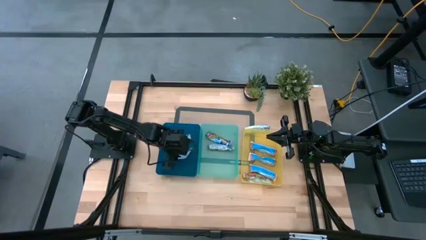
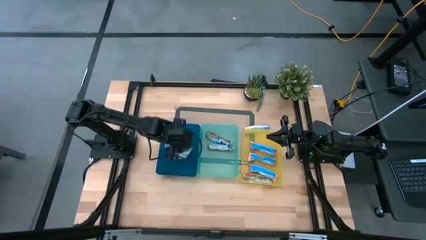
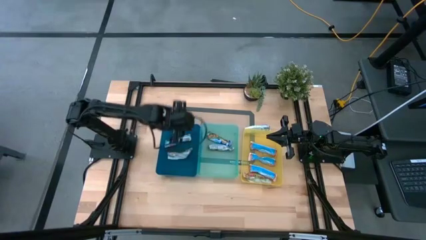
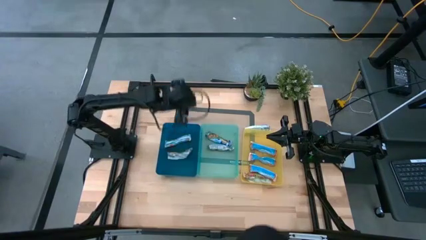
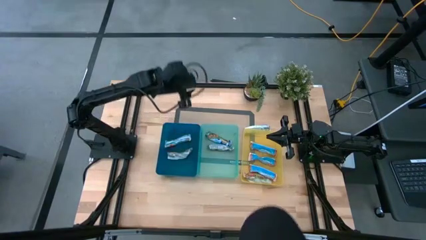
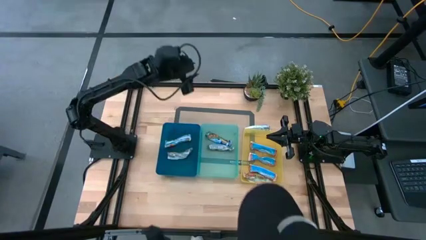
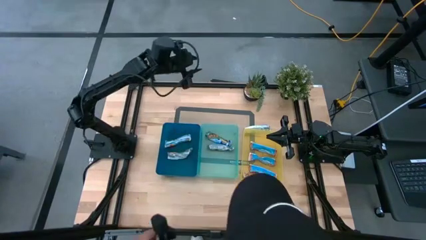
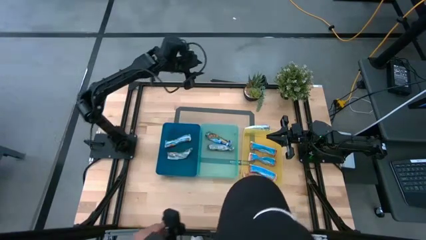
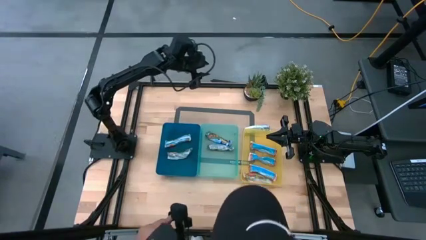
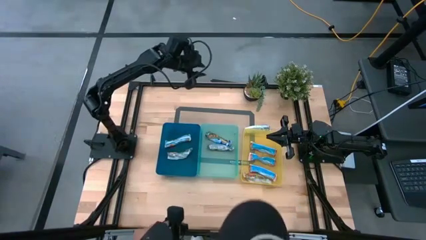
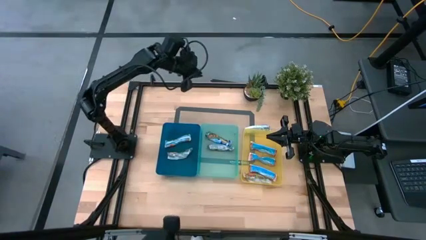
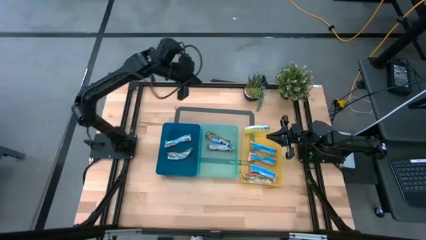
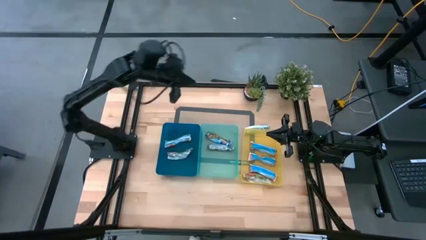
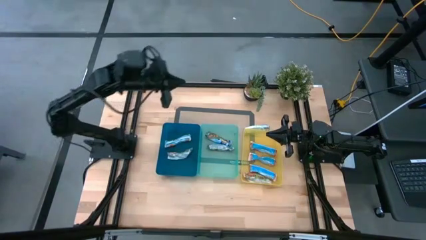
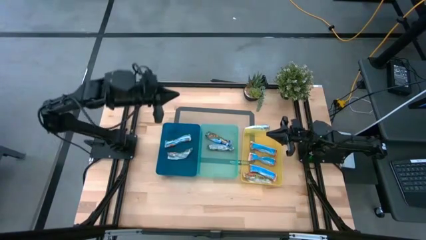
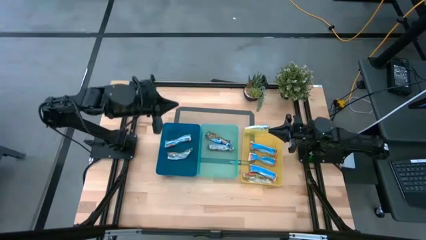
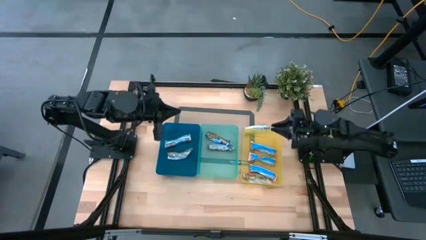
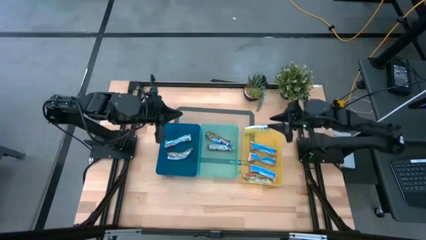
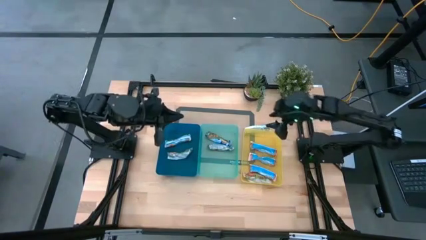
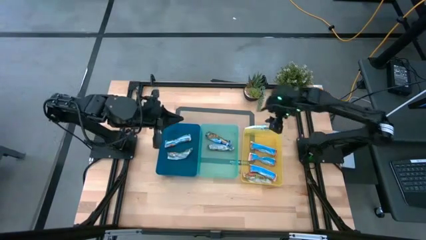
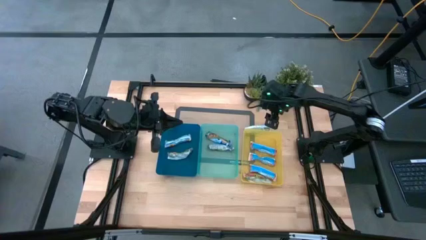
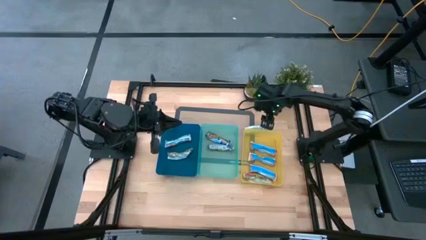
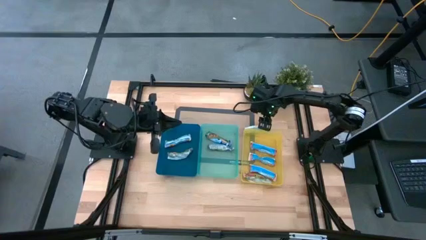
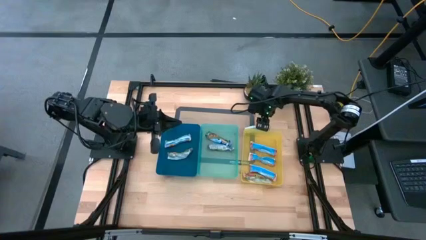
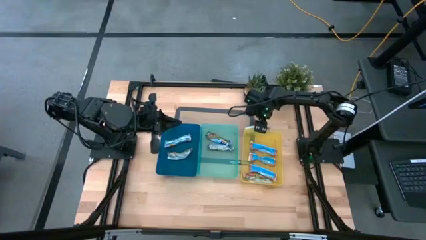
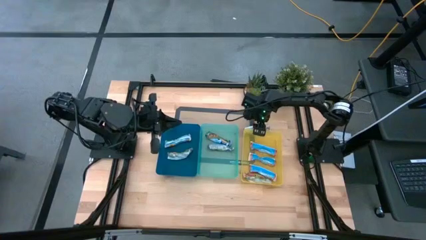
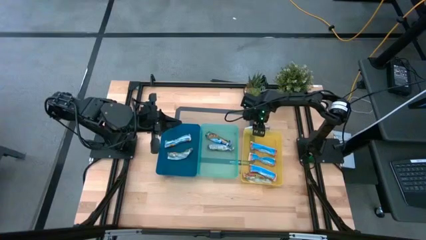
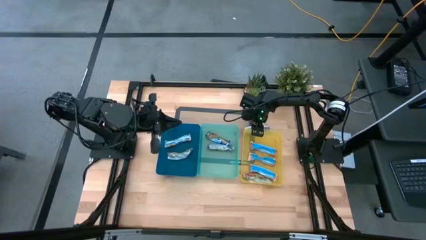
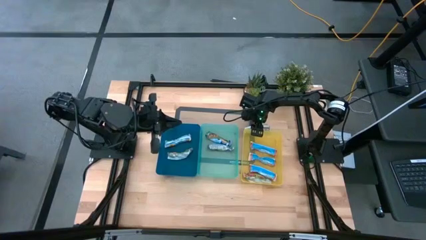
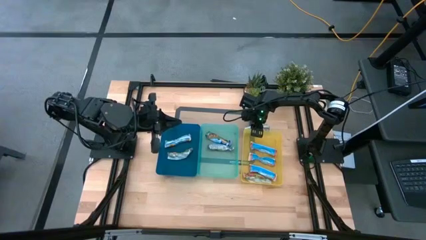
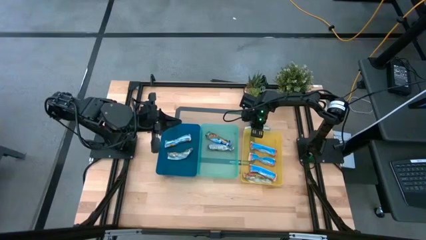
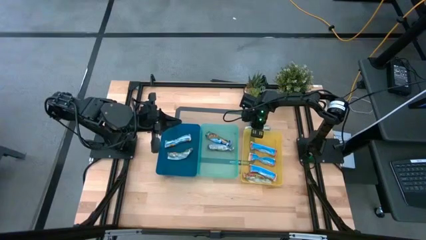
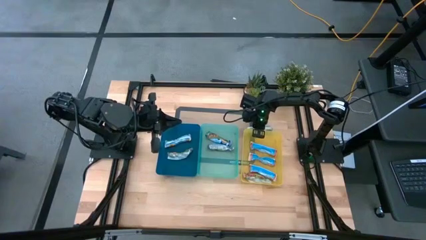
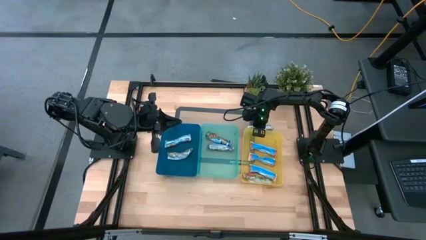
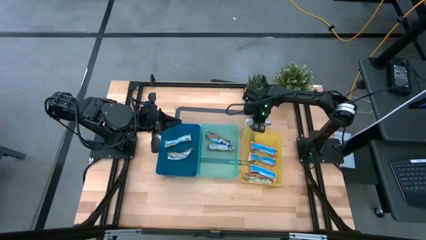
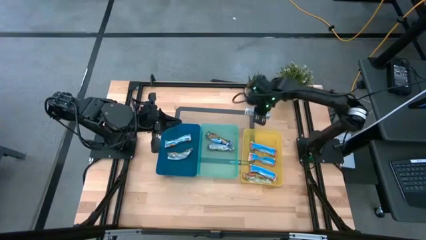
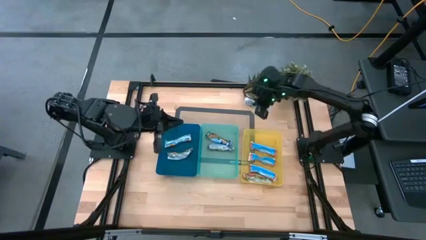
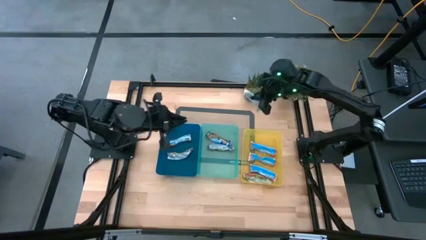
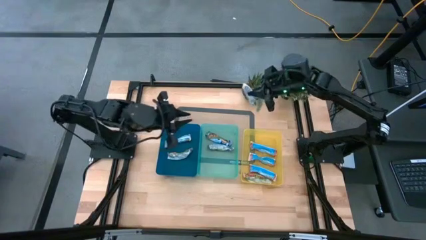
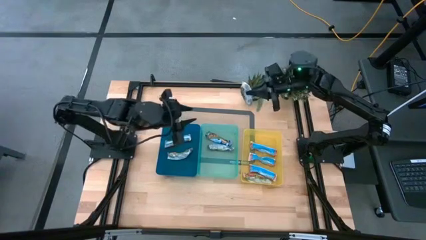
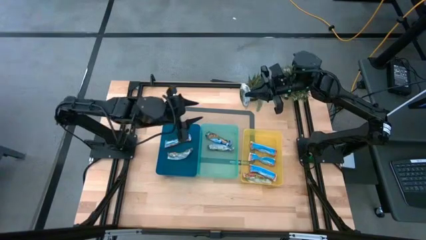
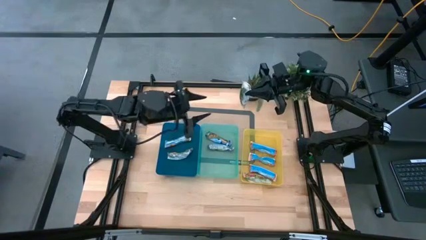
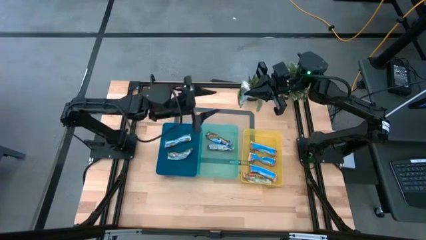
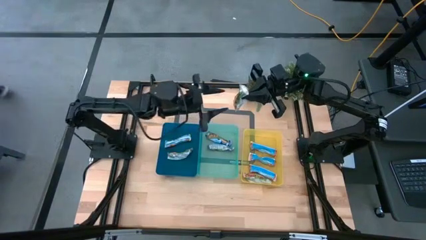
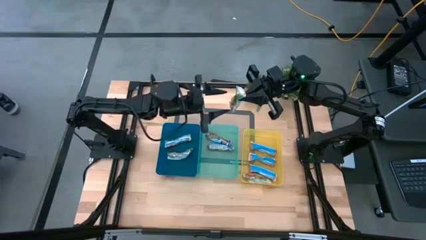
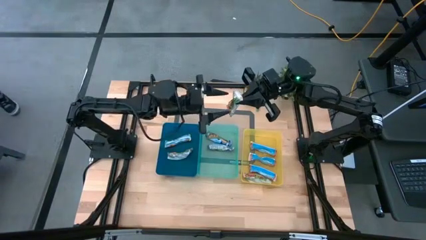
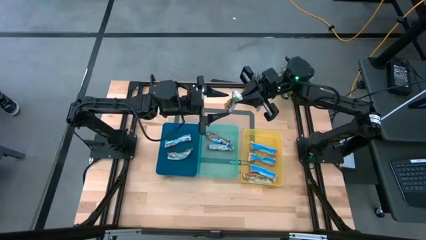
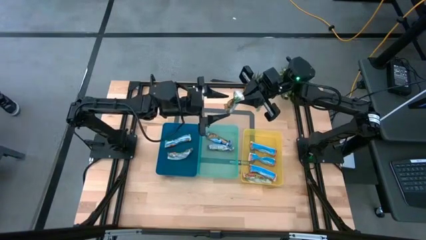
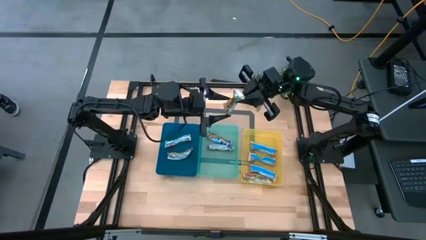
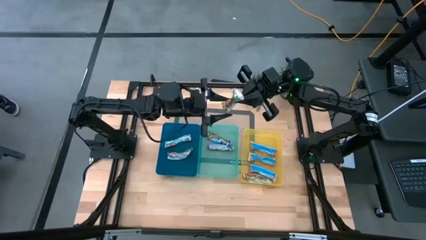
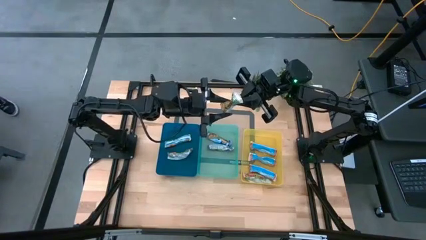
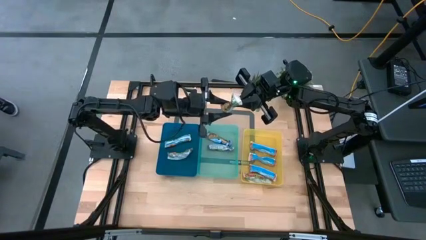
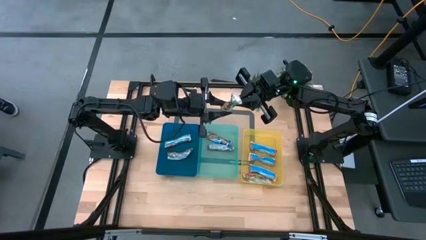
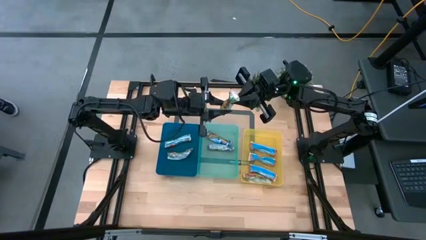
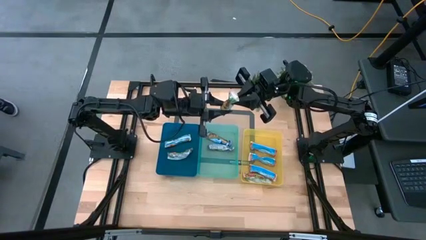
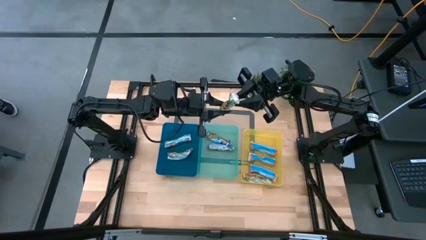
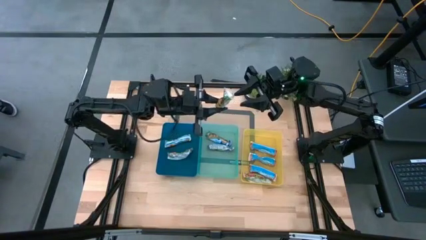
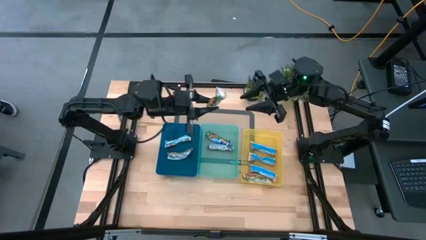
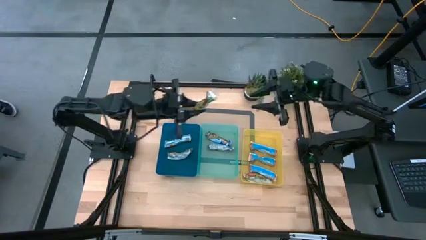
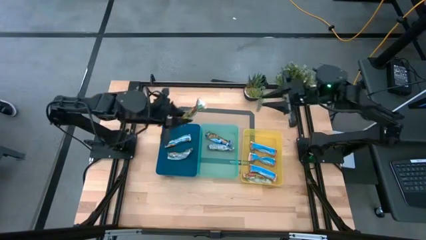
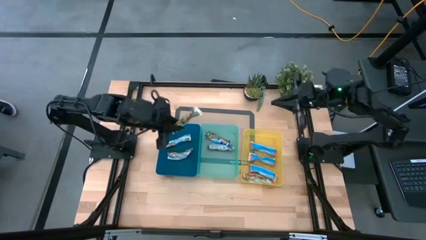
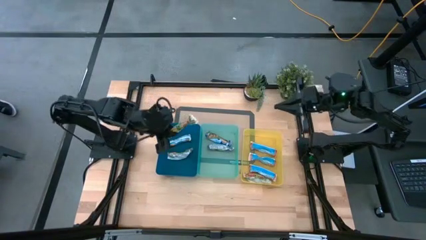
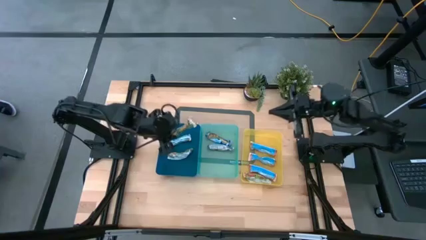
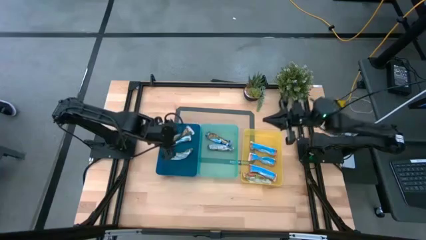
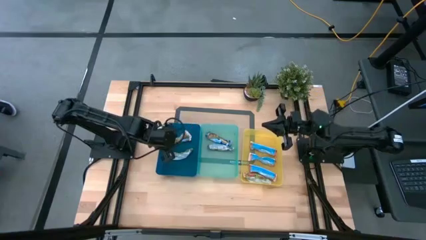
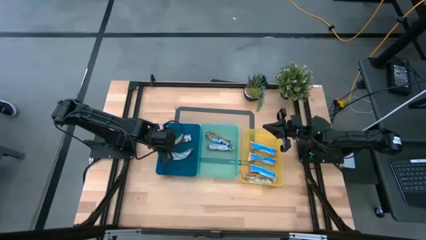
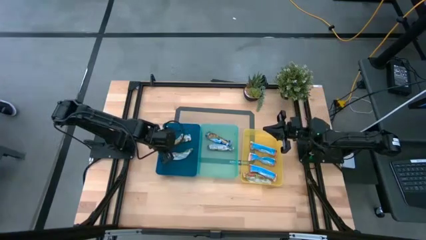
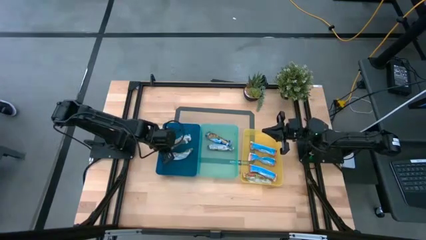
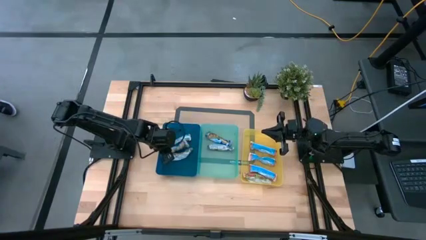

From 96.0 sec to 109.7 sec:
Task: Pick and place Granola Bars by type
Put the yellow granola bar into the blue bin

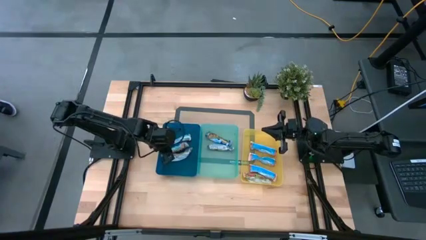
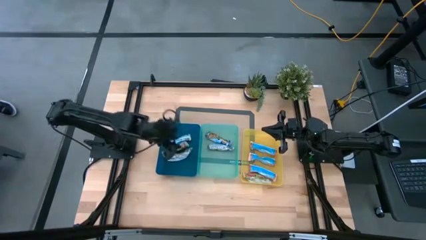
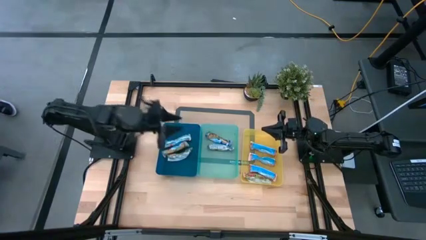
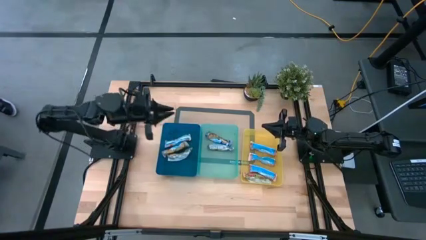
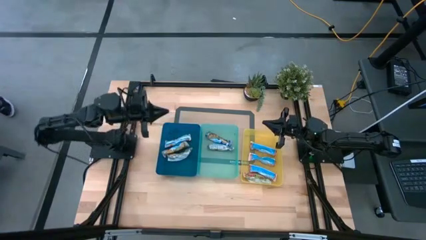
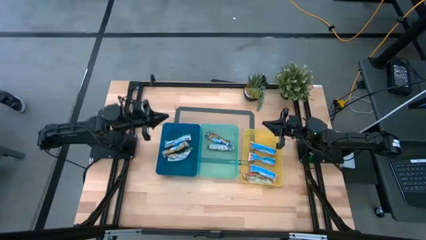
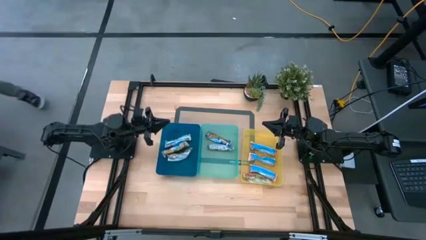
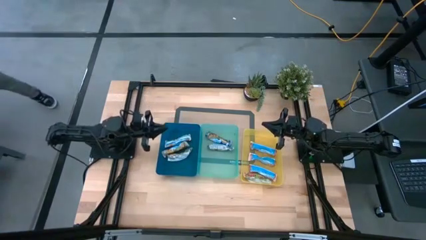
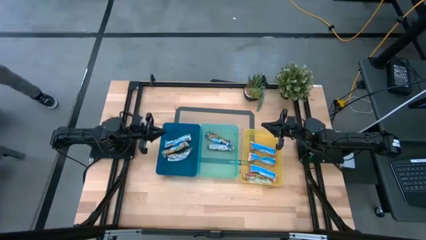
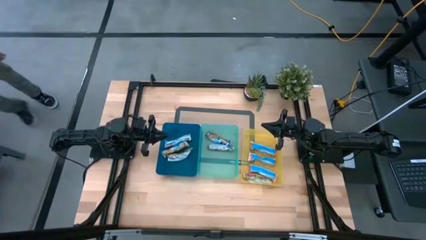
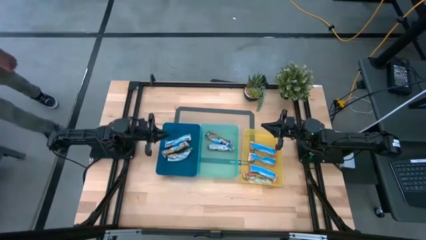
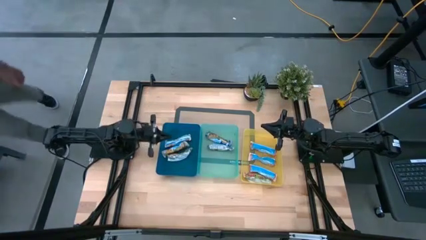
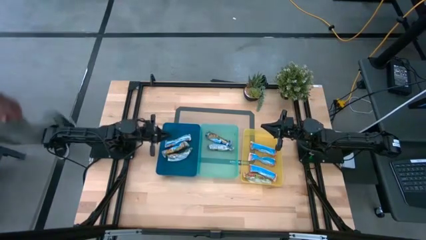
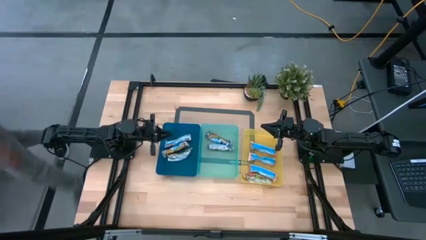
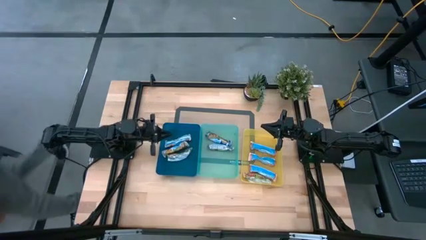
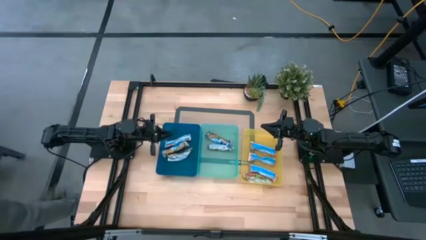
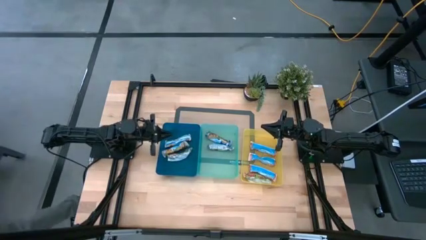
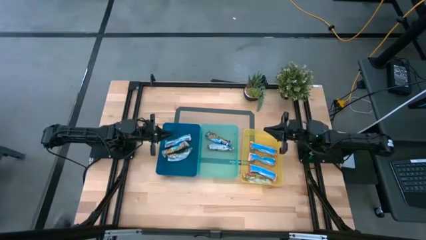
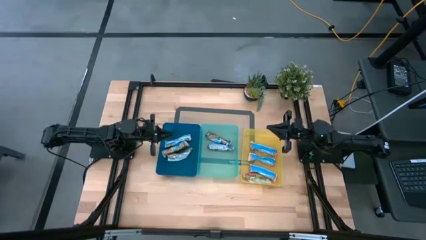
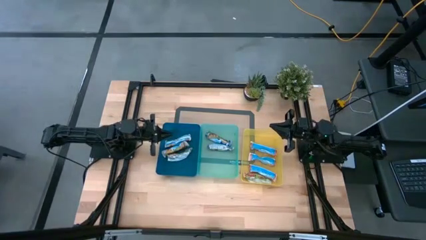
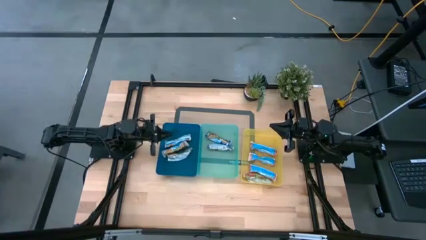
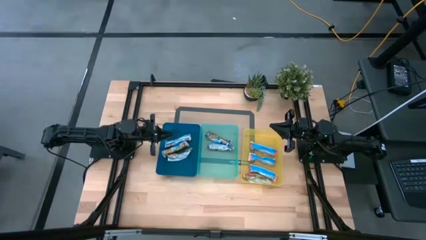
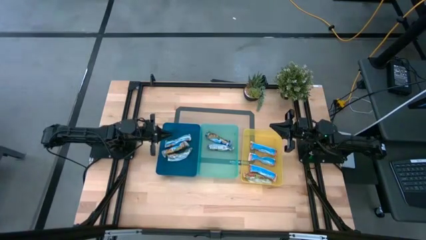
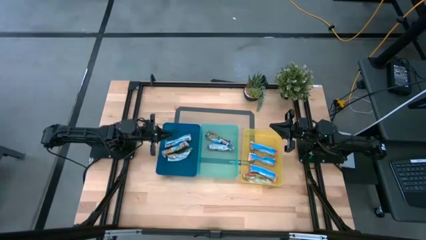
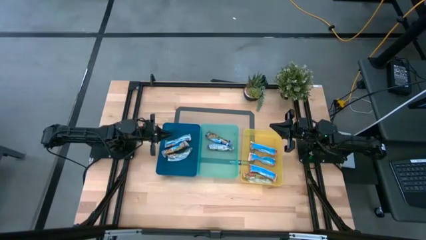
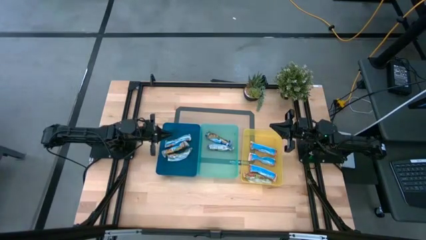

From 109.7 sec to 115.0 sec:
Return to Home Position
